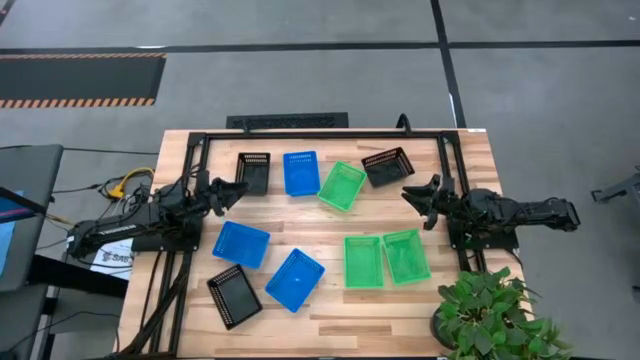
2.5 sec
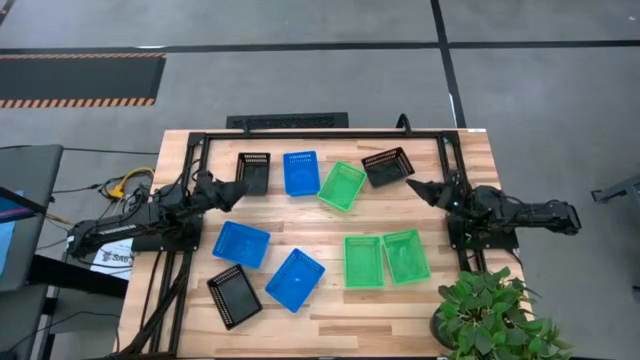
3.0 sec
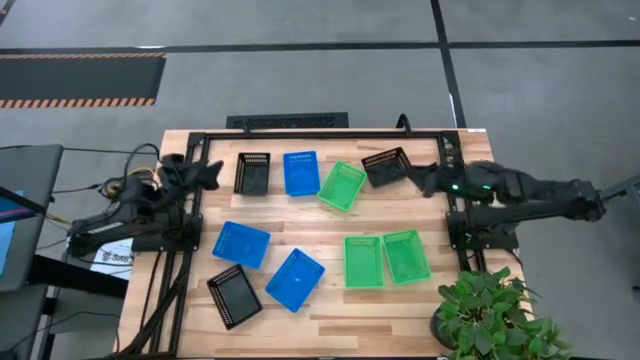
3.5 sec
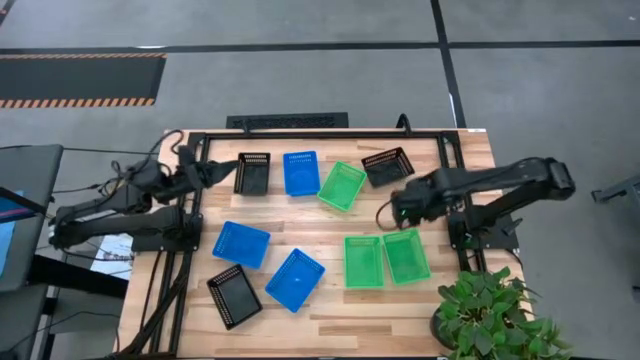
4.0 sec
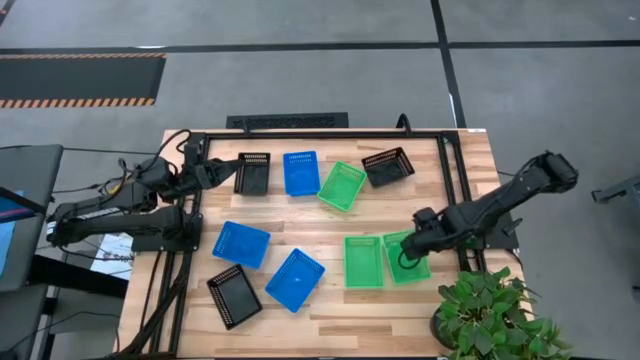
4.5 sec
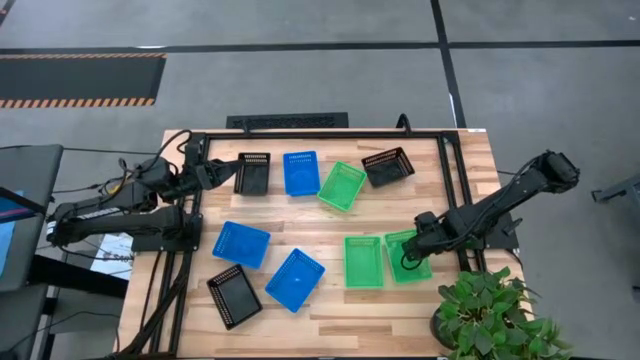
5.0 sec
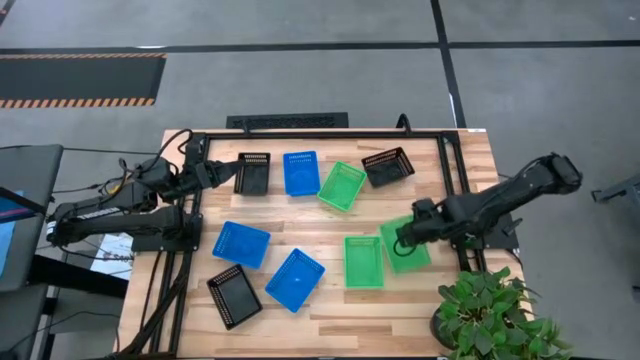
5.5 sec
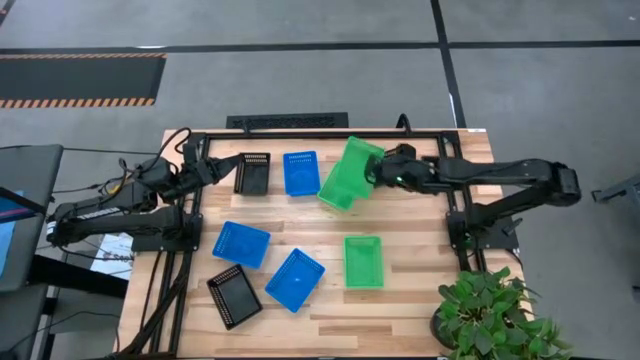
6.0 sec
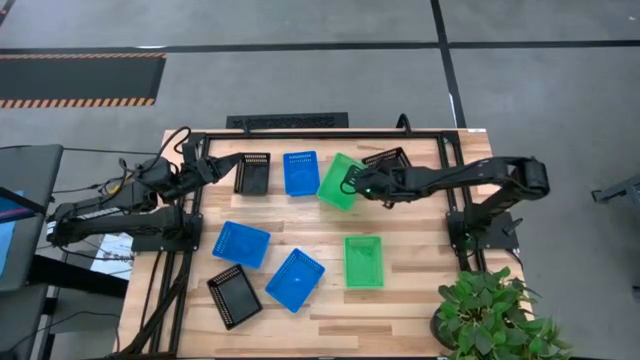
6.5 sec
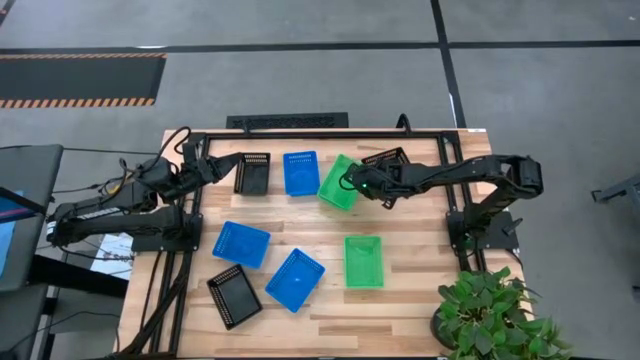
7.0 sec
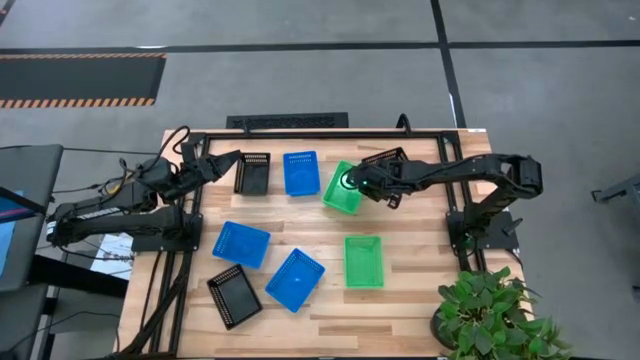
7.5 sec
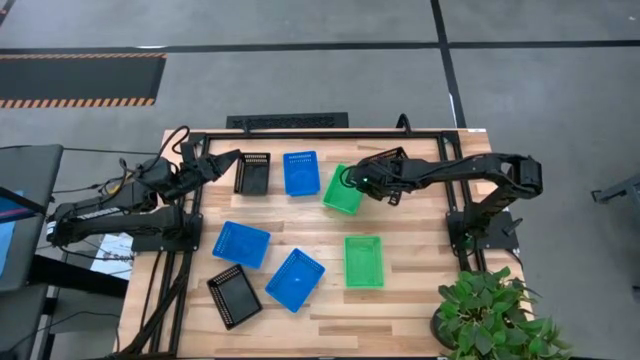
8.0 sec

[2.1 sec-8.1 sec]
Stack the bottom right green bin on top of the top green bin

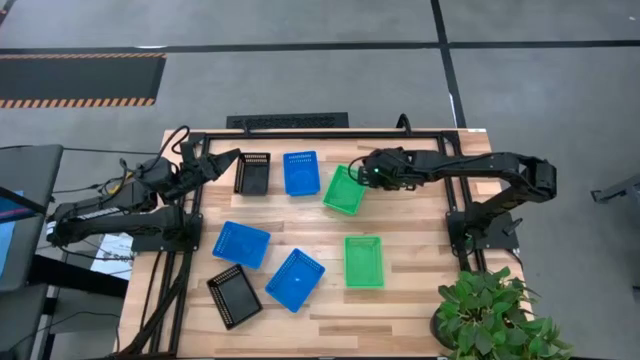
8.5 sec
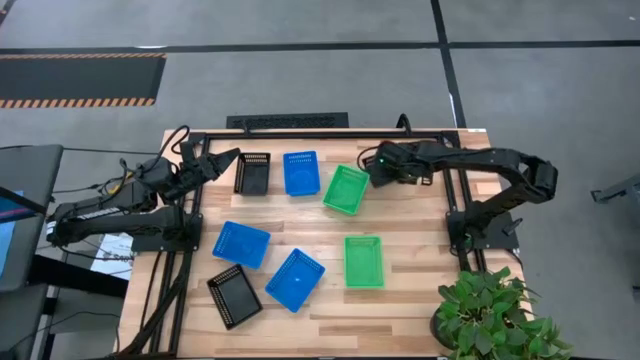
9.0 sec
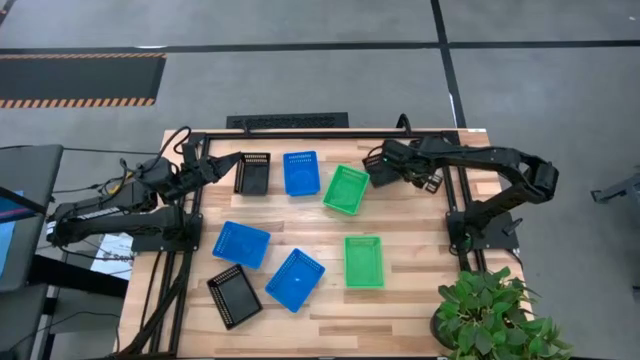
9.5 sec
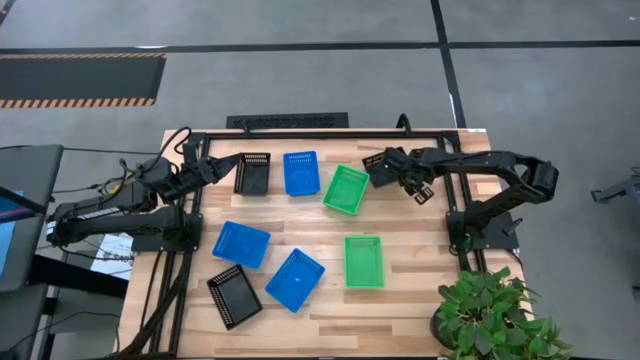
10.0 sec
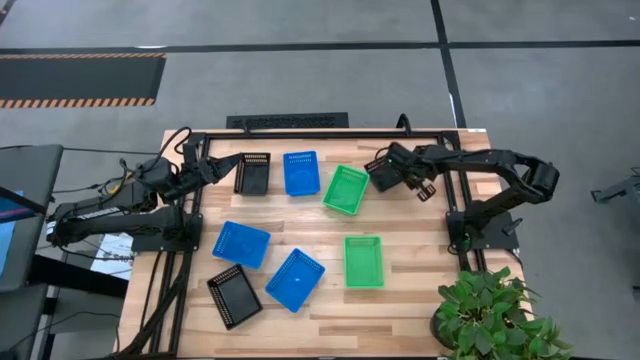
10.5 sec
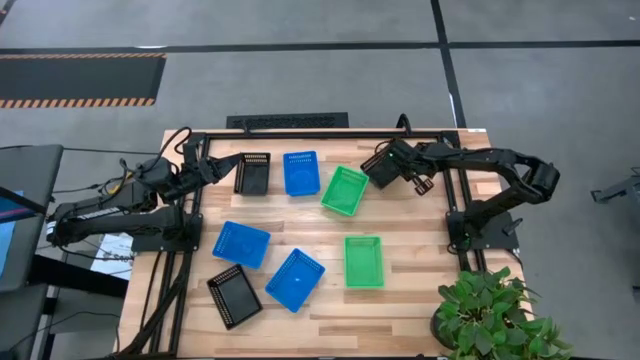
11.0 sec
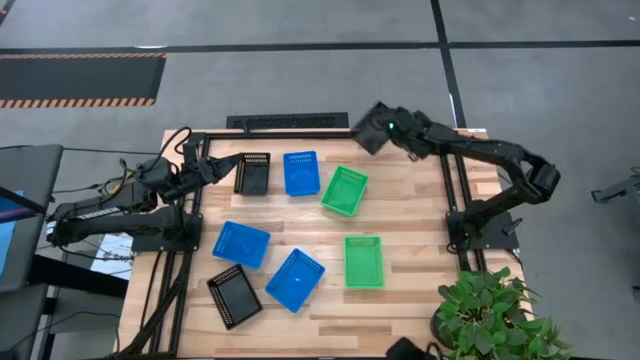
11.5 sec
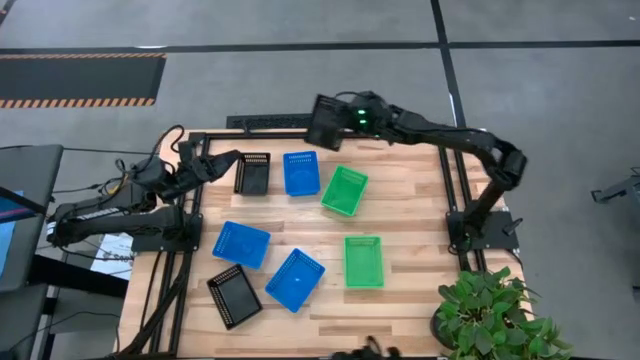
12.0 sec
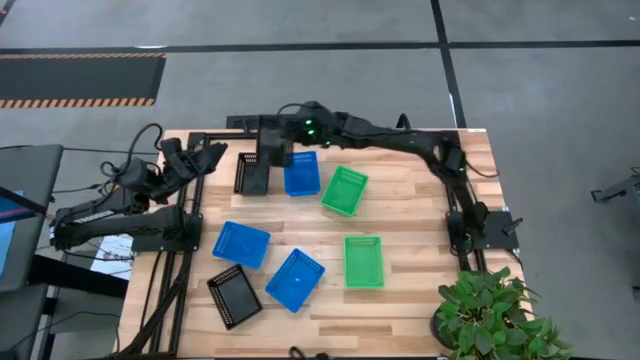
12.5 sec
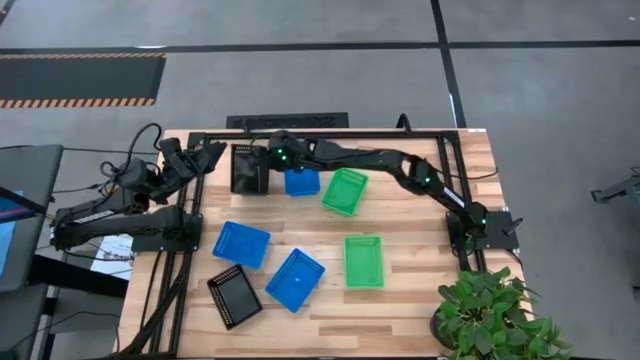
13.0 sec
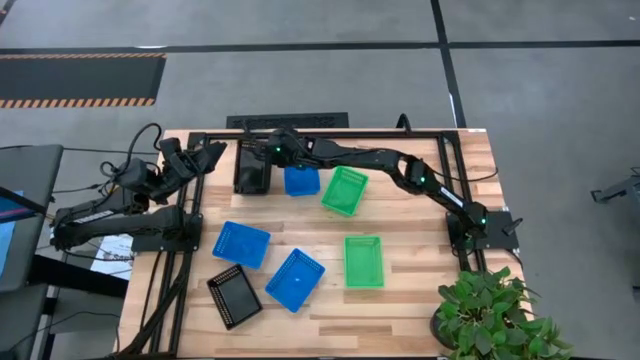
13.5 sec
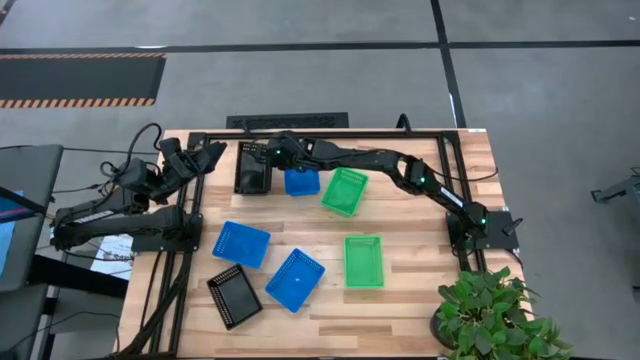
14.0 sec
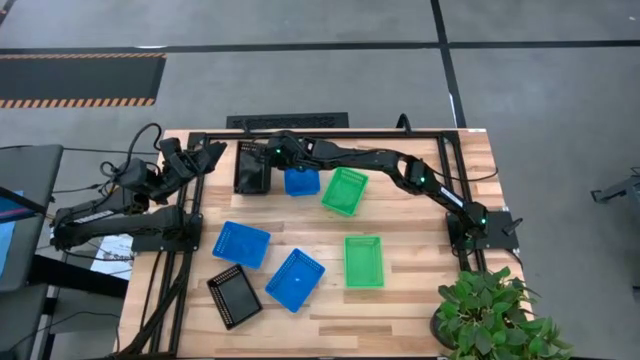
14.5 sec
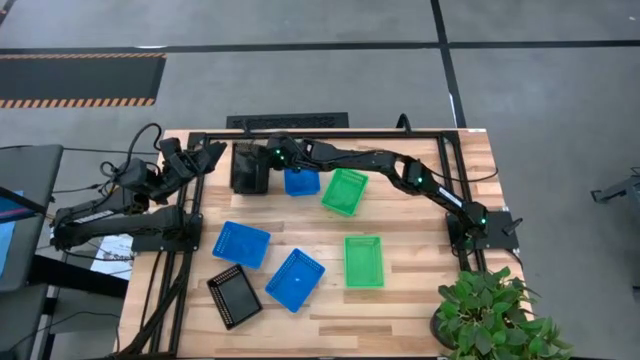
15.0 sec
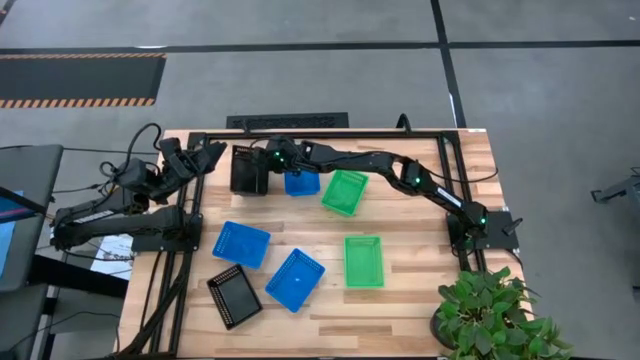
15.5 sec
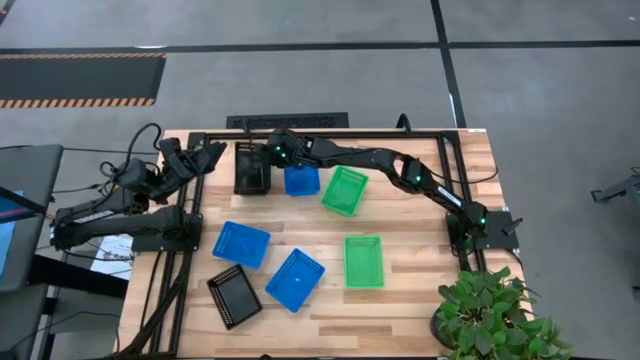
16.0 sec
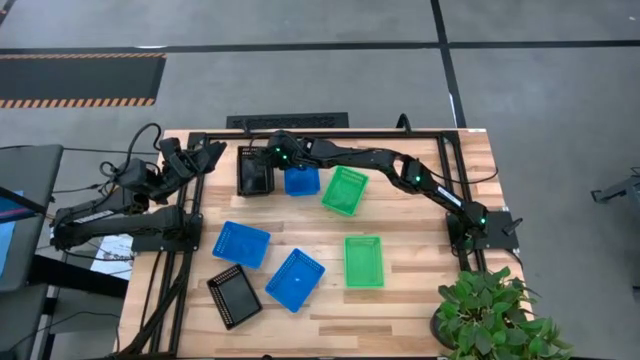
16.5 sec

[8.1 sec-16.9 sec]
Stack the top right black bin on top of the top left black bin

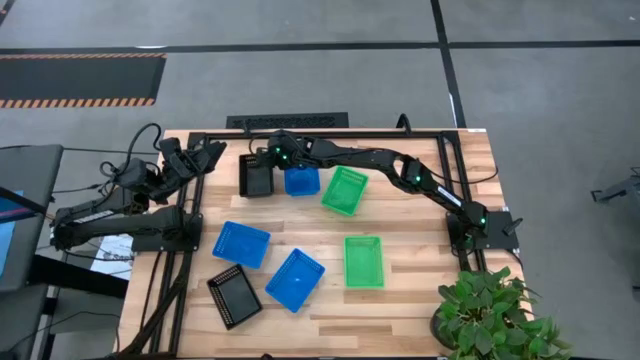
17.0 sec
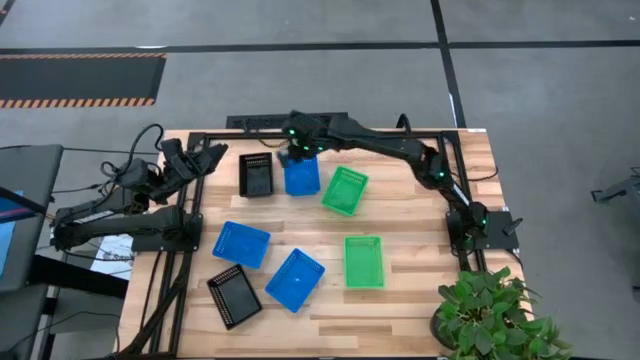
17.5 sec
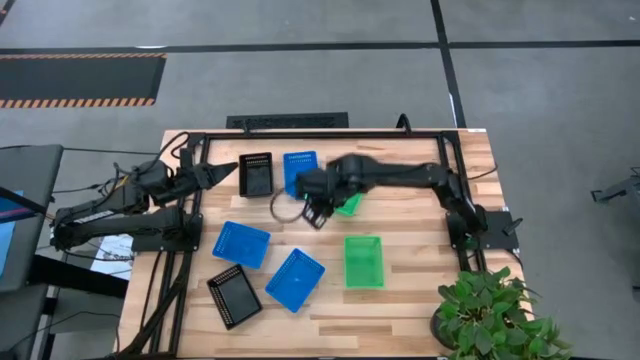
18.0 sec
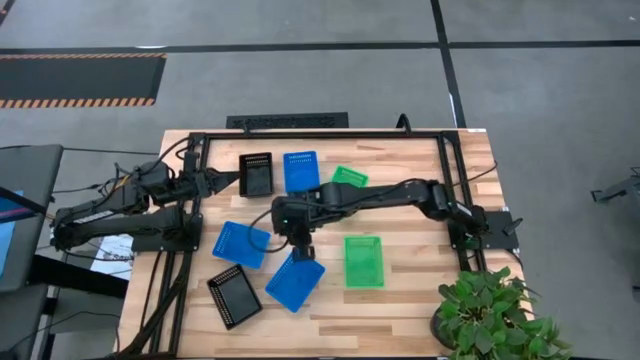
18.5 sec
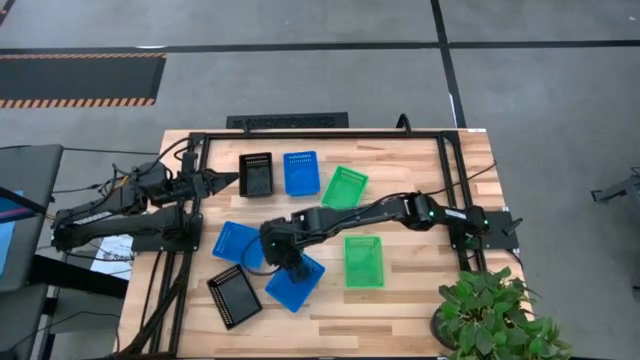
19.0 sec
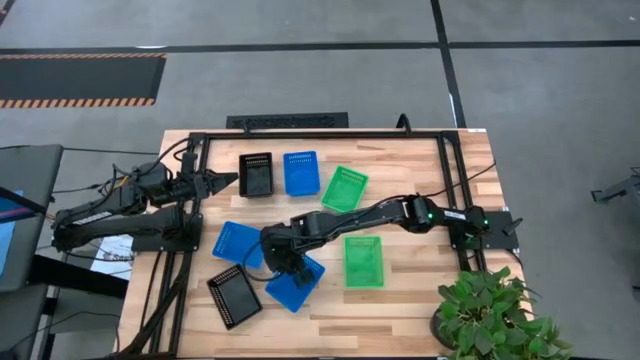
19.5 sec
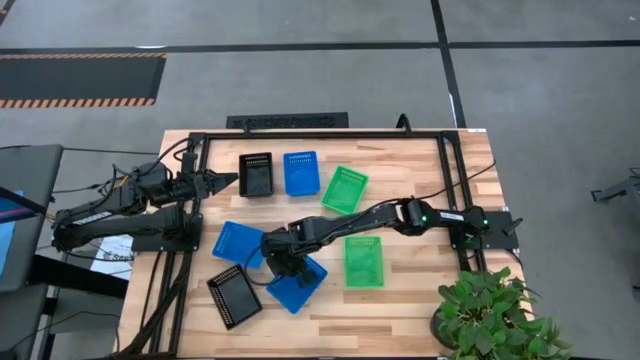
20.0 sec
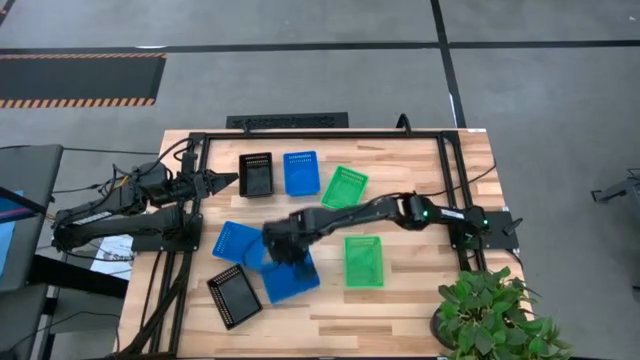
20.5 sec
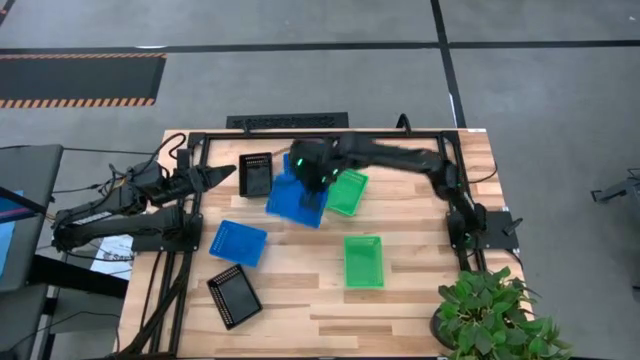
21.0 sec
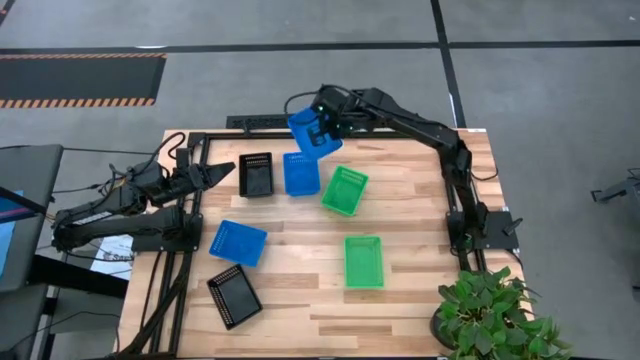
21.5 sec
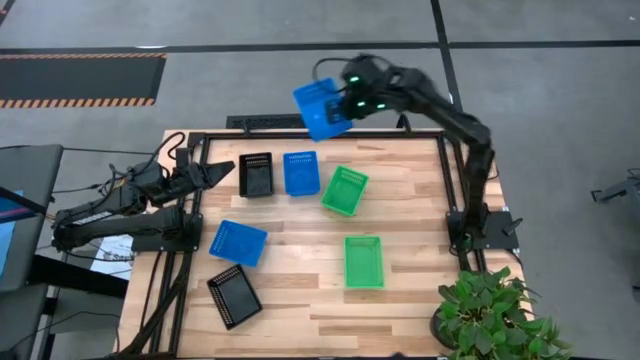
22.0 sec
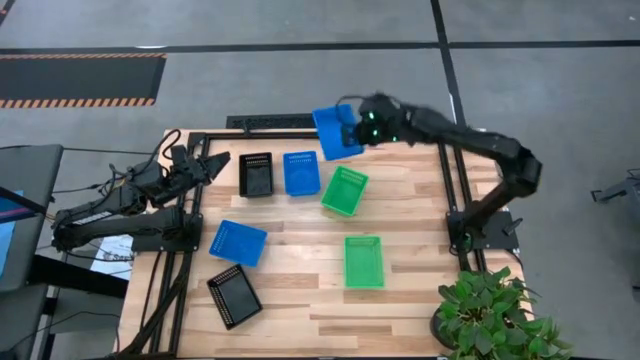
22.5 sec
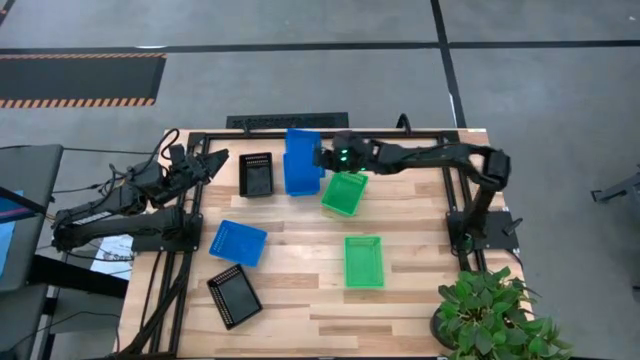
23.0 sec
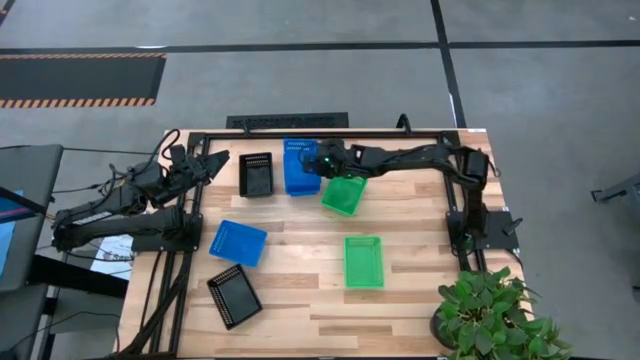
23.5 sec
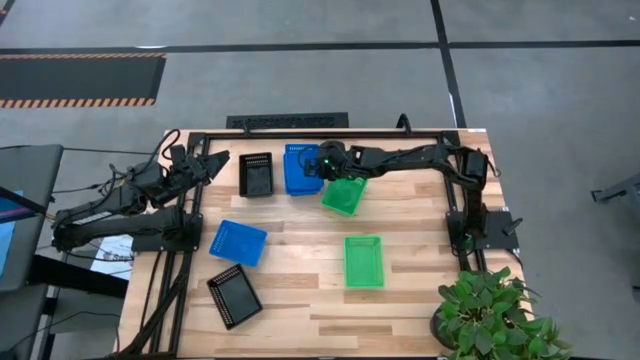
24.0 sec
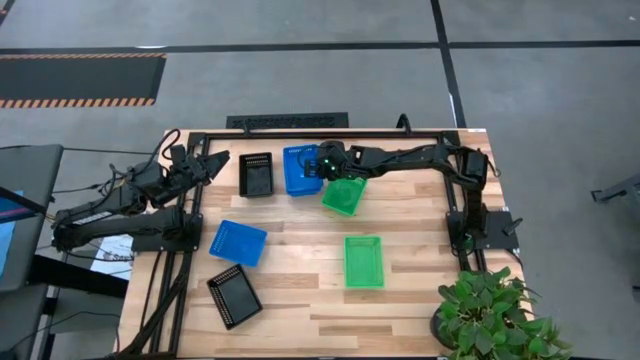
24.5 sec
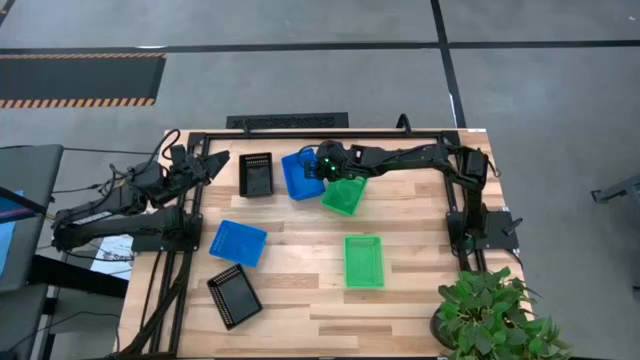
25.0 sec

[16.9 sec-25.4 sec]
Stack the bottom blue bin on top of the top blue bin
